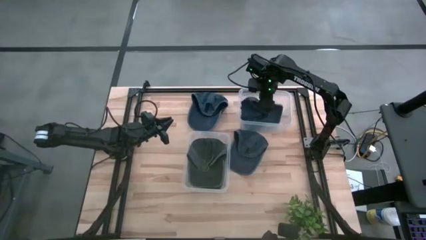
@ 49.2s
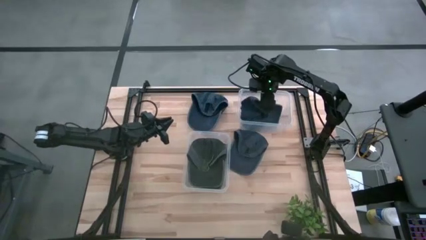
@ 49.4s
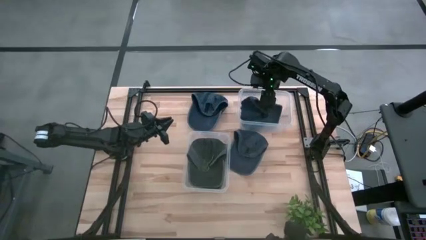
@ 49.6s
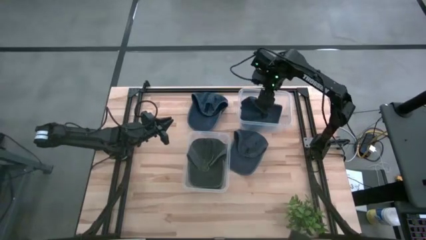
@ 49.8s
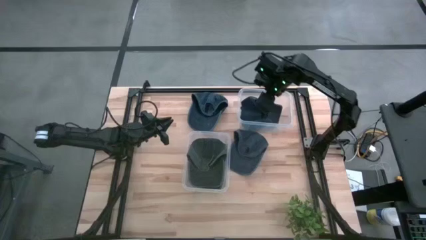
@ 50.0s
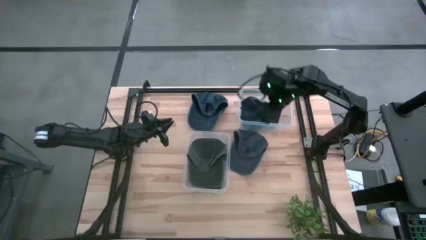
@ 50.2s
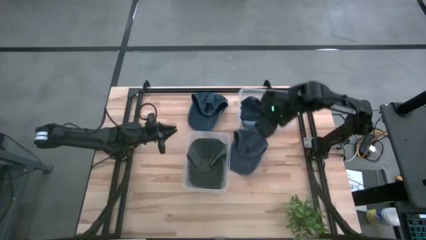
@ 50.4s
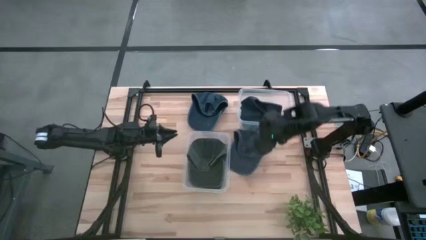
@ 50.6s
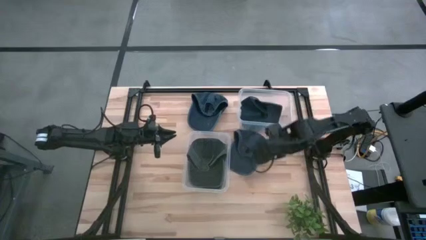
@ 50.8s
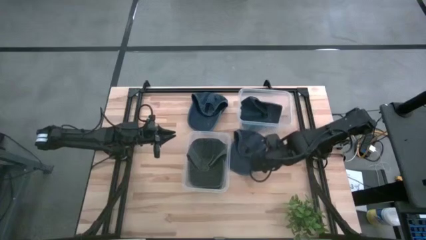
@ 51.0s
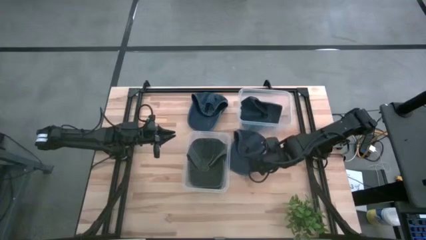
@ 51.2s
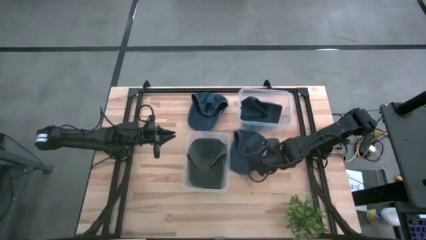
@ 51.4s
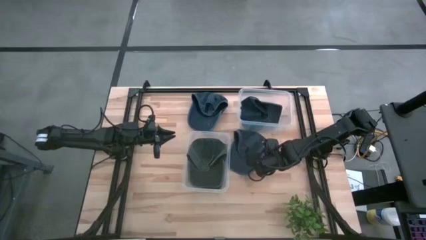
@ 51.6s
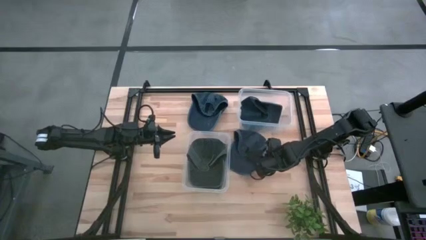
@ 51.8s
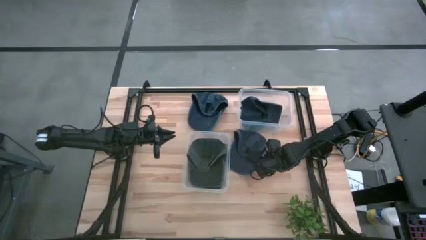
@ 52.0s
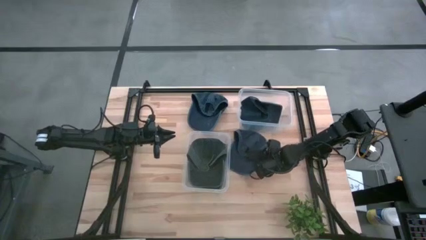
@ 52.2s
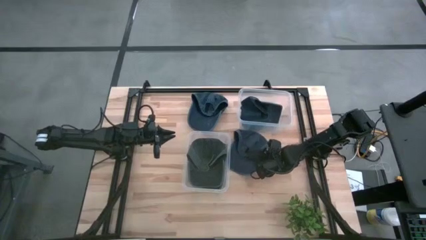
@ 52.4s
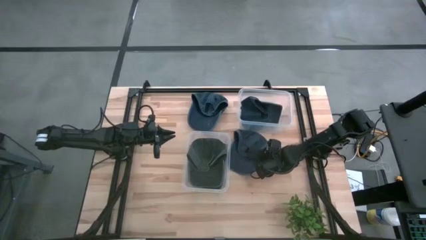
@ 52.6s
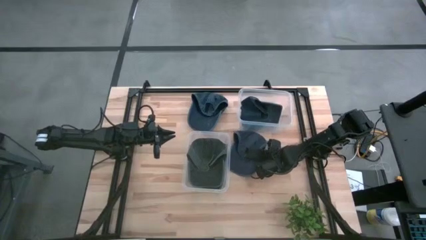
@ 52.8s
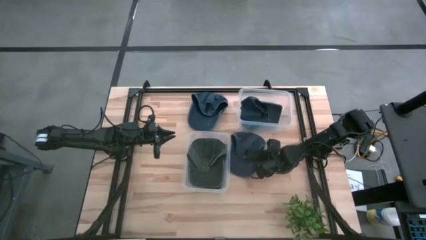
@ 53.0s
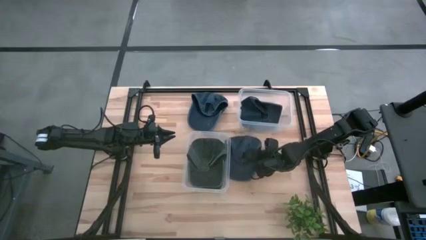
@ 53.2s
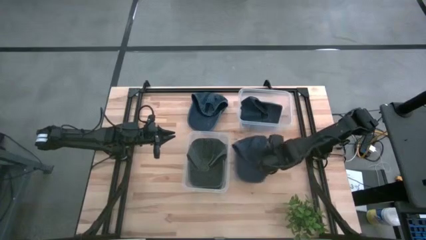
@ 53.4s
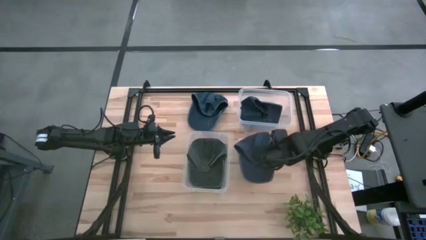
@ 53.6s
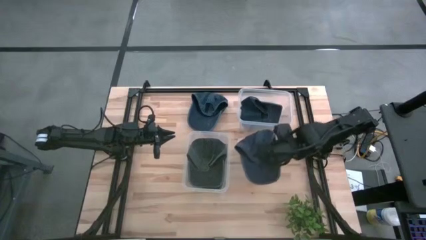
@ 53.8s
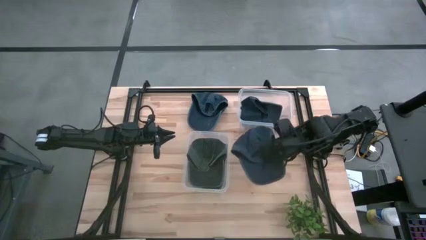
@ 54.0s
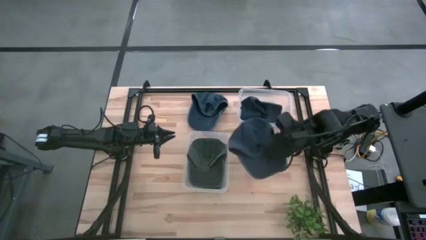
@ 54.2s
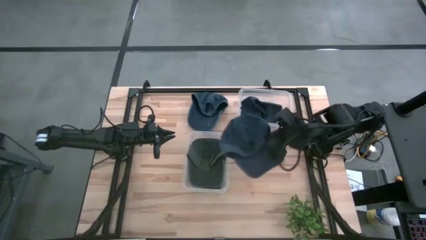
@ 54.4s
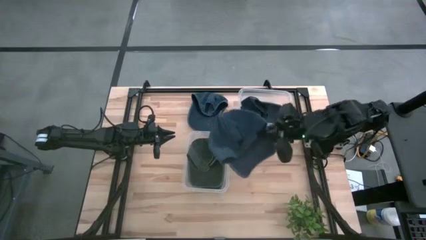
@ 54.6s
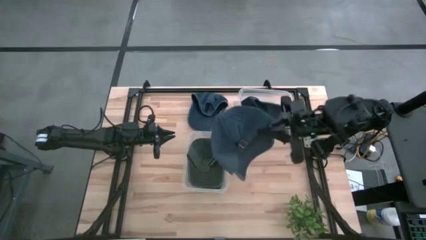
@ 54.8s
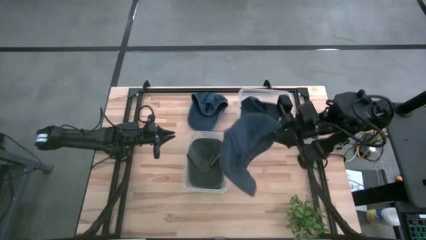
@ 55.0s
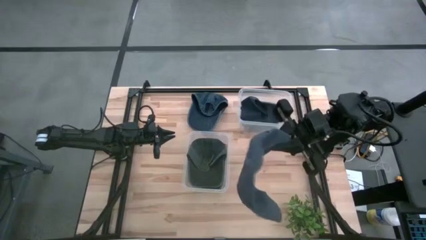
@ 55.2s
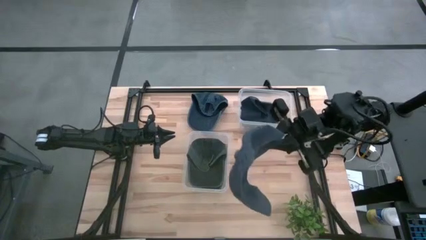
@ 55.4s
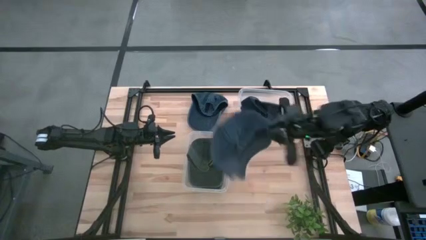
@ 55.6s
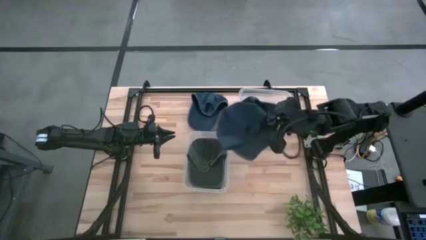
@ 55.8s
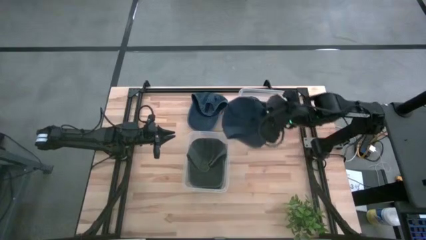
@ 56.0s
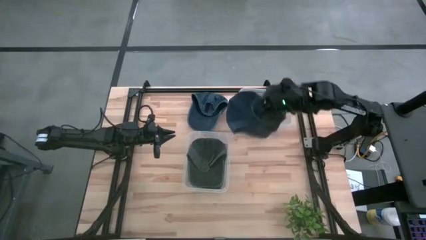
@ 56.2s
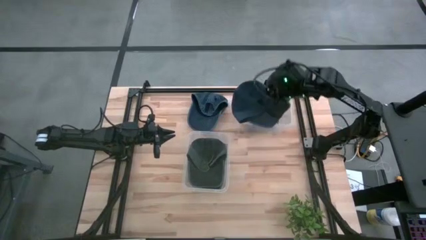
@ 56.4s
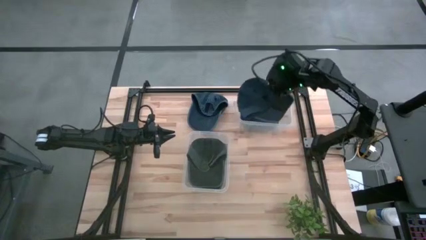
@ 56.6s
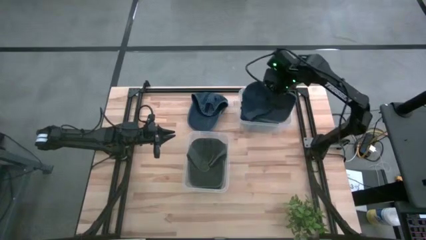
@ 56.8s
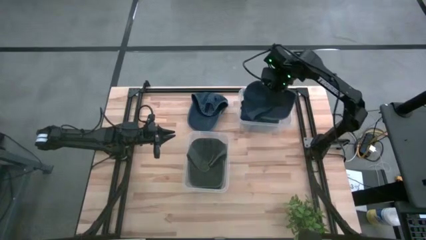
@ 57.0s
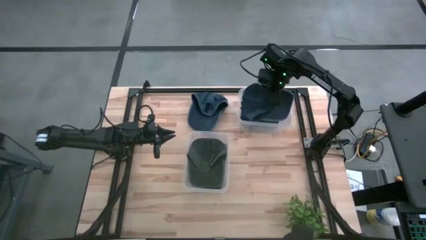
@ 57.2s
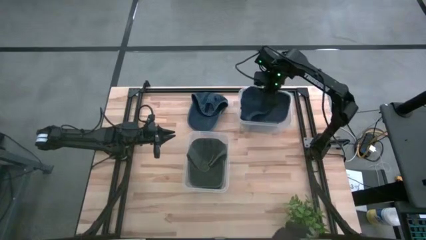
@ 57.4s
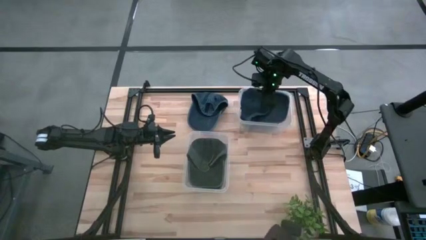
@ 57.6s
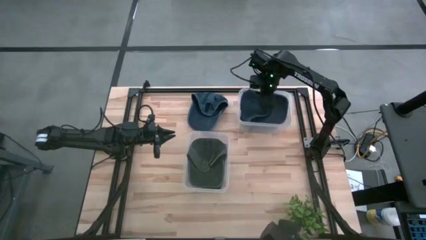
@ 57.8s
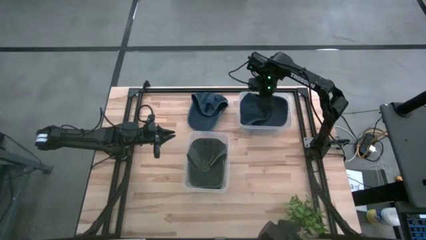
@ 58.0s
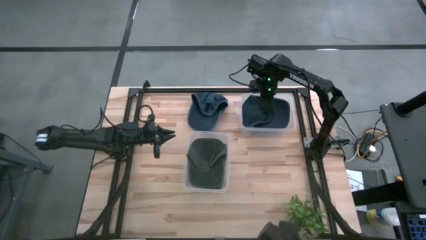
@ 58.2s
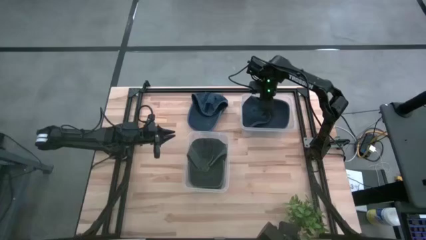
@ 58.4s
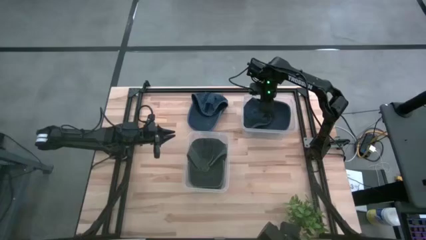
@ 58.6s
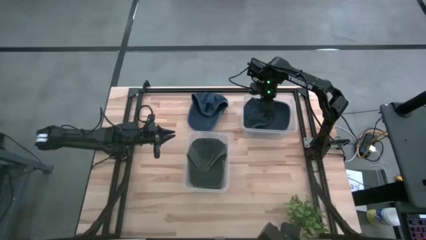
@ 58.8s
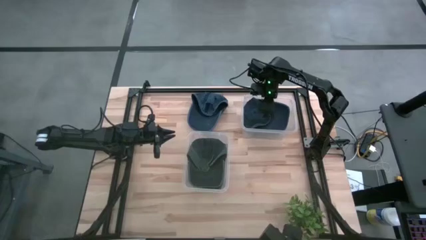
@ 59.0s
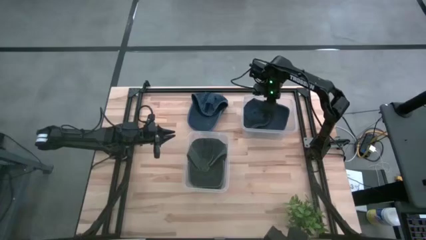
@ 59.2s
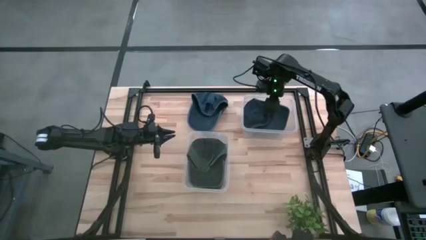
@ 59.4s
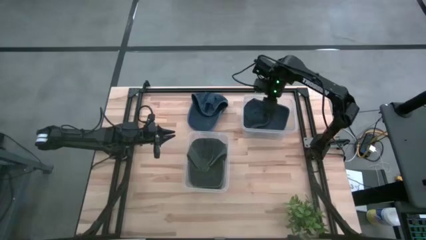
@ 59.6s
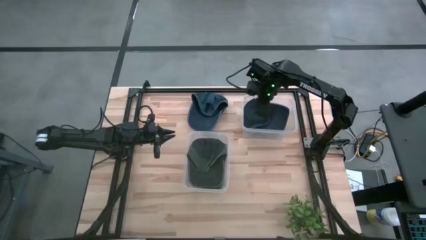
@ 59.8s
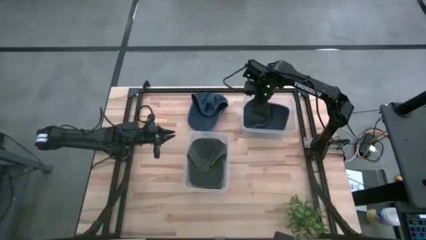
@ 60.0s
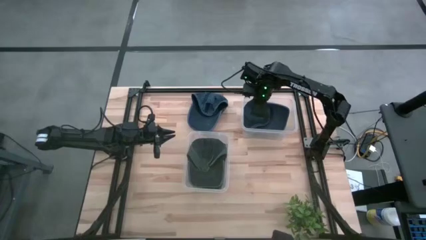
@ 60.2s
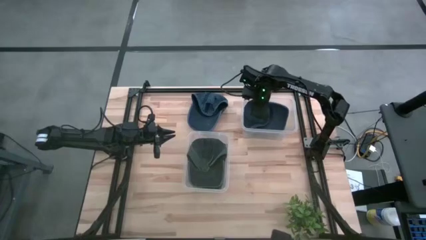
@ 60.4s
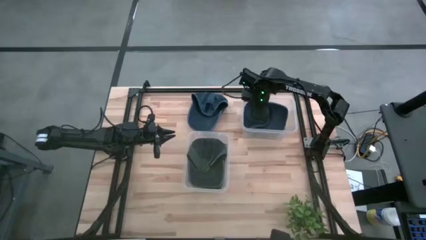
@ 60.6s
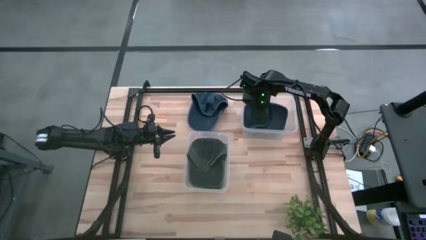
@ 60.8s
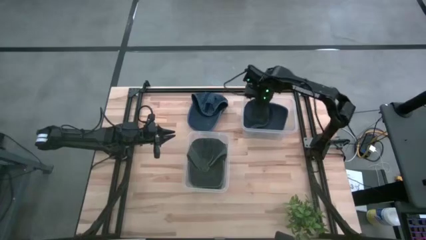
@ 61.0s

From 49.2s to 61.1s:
Task: Pick & Place hat
Put the bottom blue cap into the top transparent bin

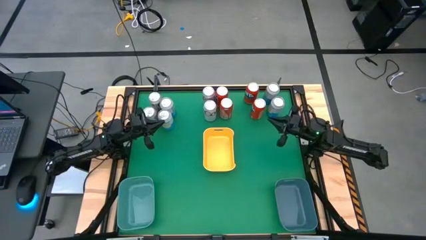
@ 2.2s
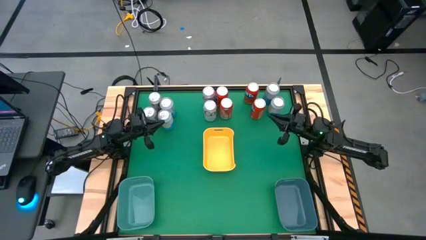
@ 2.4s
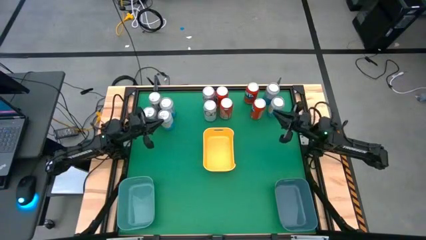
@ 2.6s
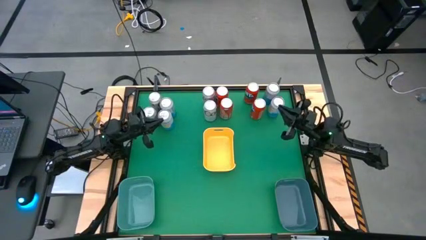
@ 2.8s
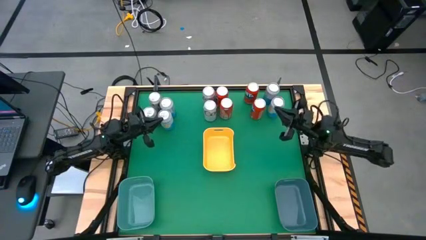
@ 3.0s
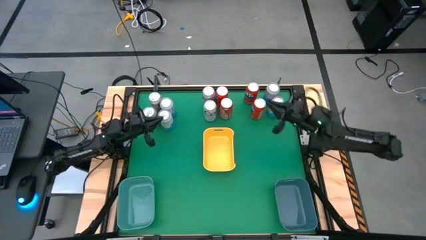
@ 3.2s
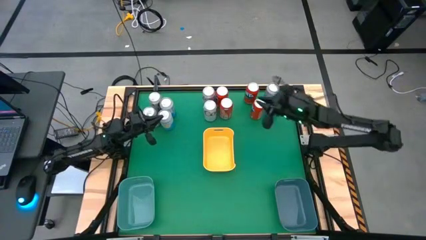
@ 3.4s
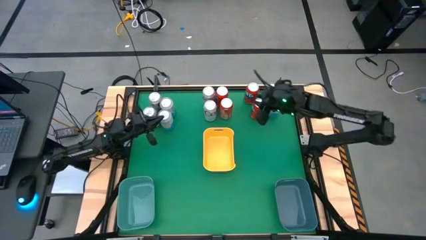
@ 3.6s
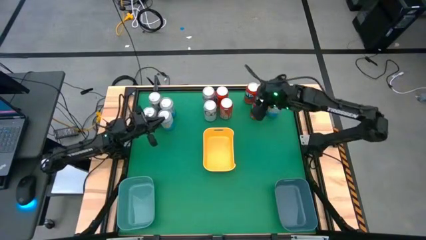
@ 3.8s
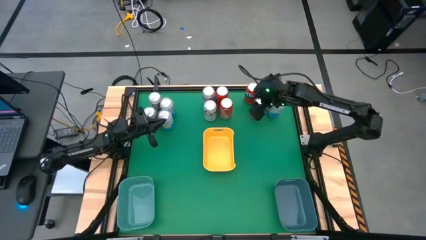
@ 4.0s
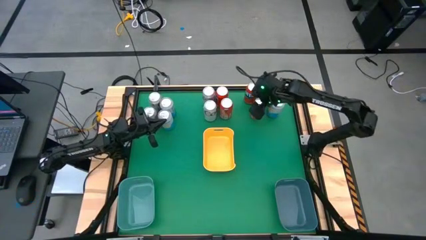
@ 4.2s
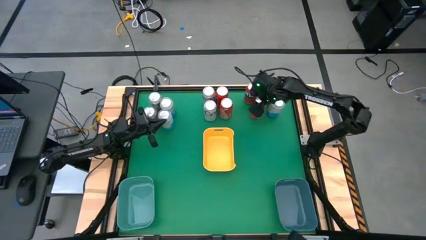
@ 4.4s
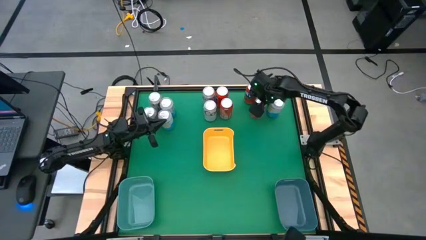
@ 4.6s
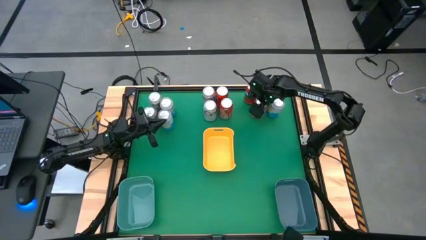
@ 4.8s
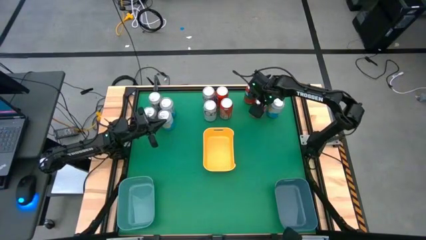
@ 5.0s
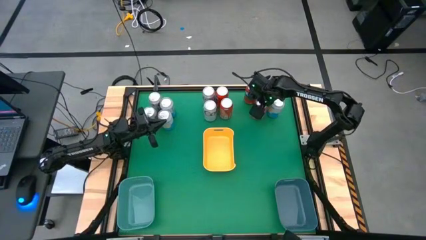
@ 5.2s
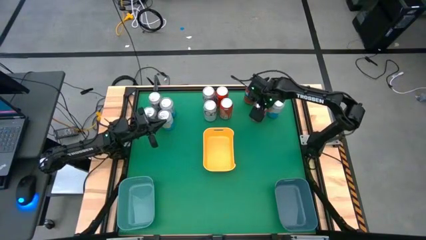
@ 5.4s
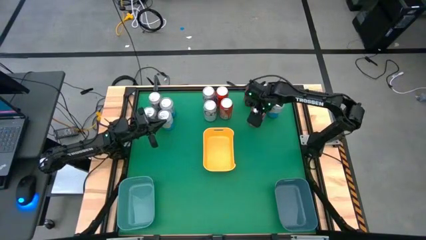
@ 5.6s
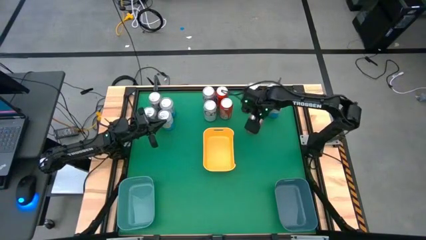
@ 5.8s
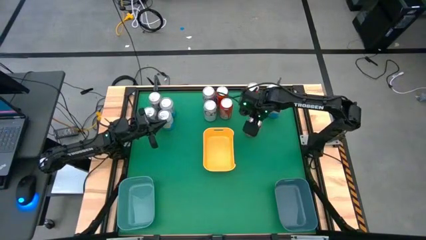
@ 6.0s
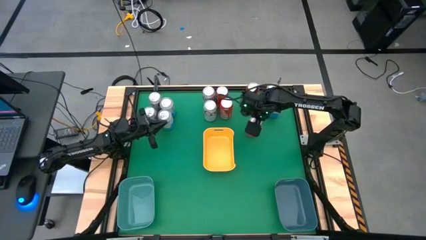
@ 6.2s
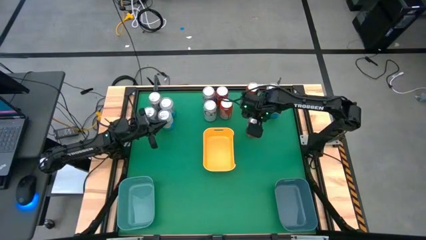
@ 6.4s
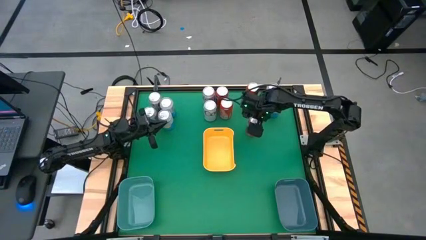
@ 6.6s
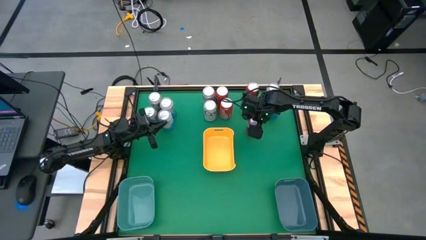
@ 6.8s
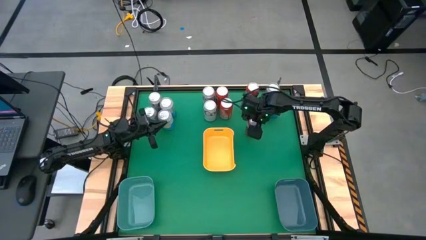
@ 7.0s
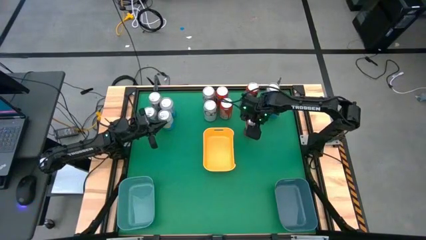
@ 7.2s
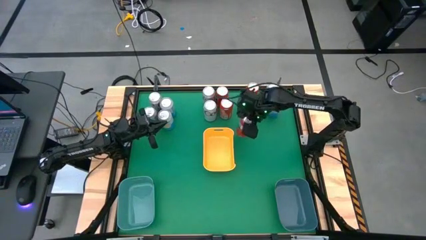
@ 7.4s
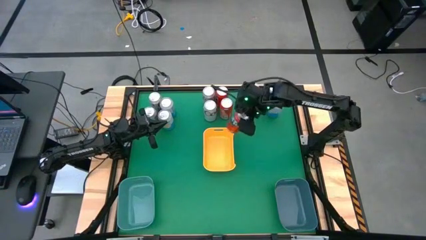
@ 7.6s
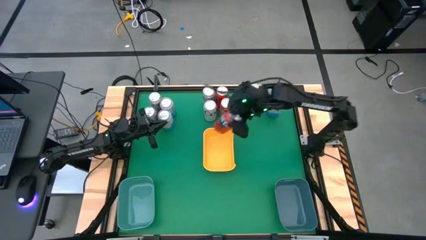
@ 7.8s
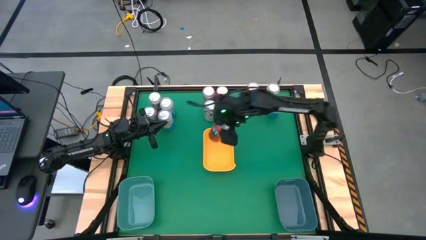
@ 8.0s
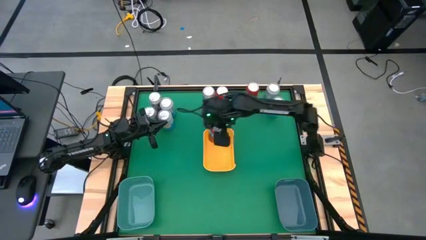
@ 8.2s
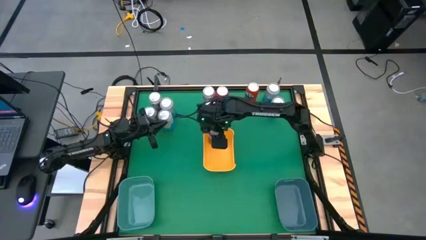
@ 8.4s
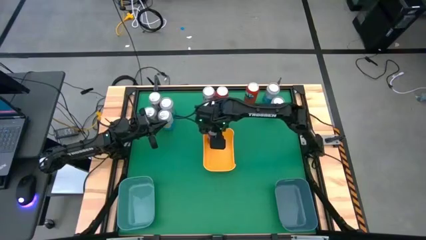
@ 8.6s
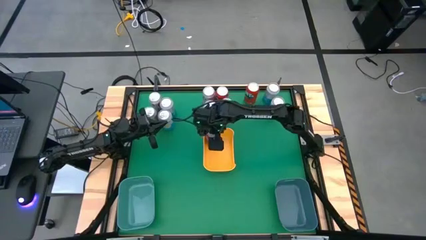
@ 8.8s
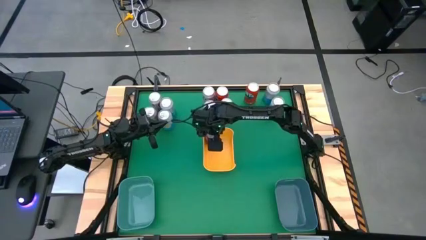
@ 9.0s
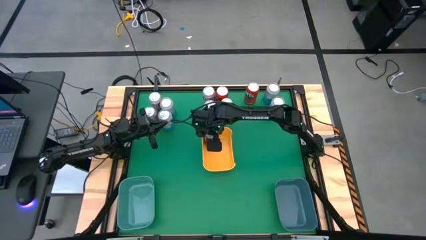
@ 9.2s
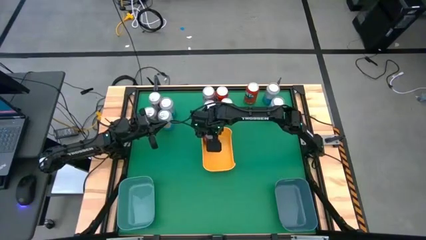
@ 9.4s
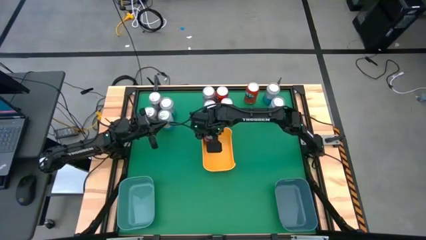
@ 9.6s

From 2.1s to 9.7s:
Task: Sort soda cans
Put the bottom right orange soda can into the yellow bin
